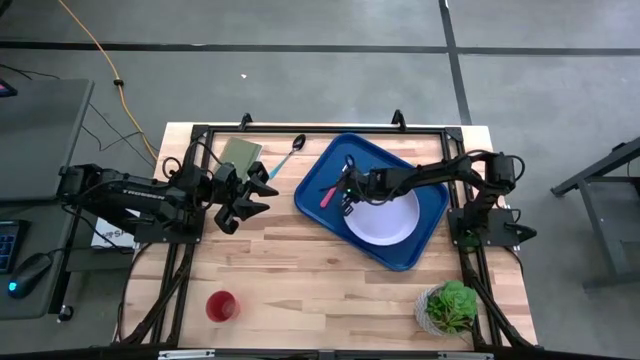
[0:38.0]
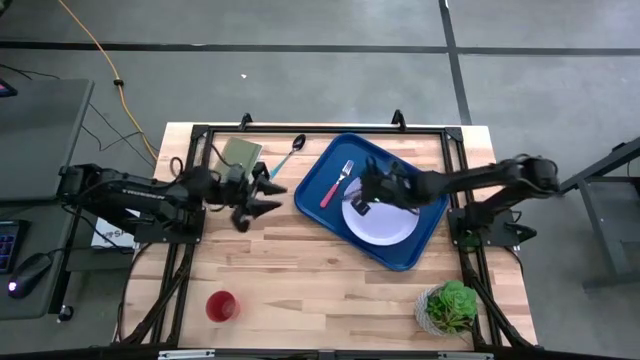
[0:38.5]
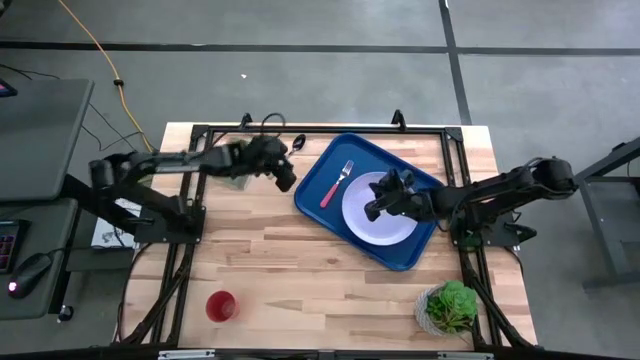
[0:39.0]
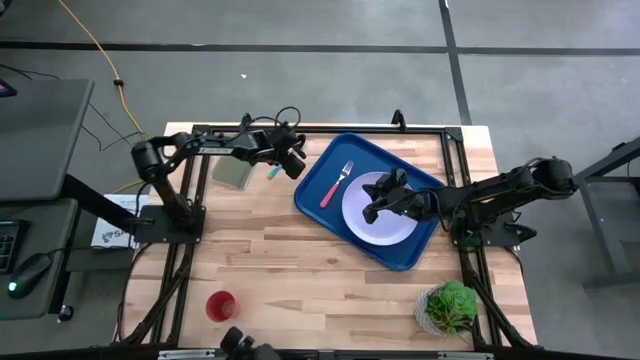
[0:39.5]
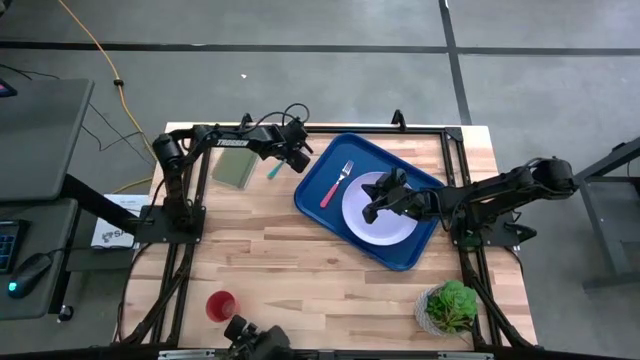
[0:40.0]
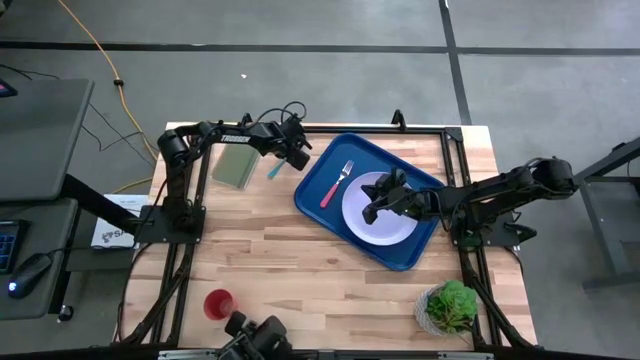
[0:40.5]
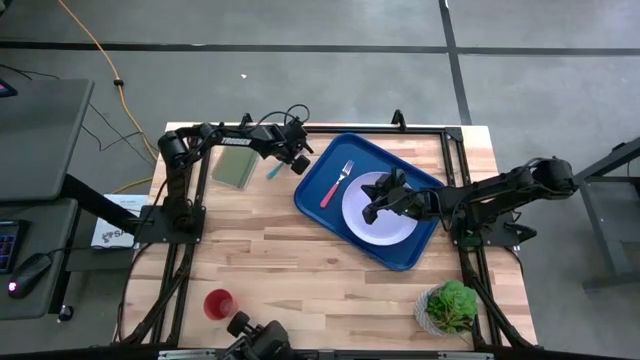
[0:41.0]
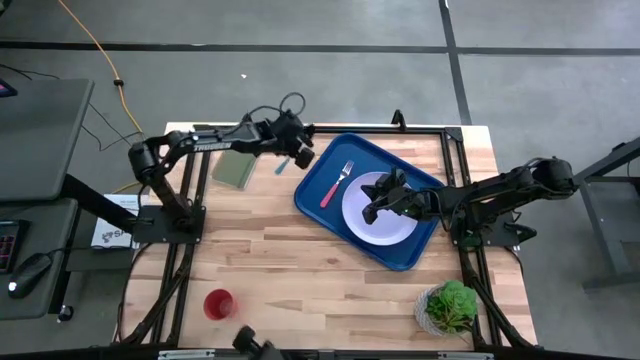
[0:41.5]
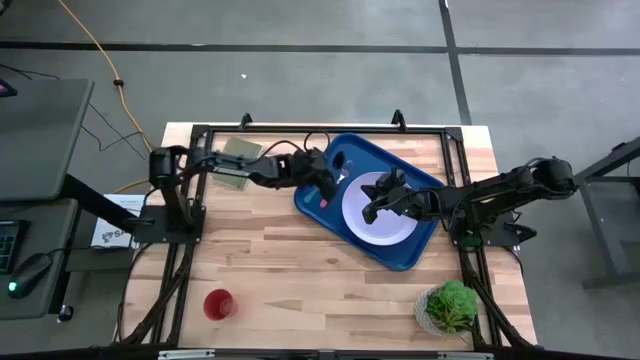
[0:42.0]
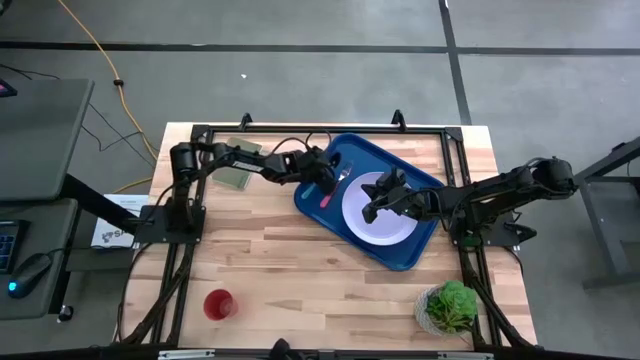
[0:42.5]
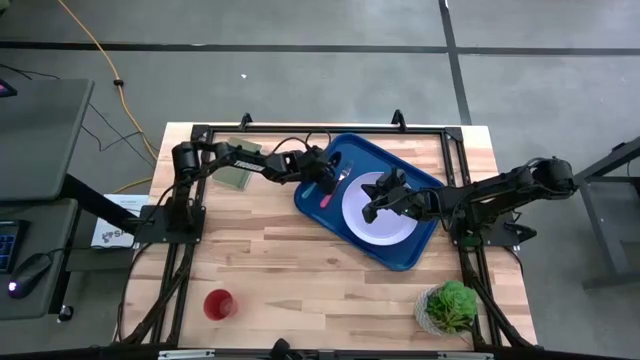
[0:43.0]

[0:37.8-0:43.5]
Task: Pick and place plate/cup/fork/spoon on tray
Put the blue spoon on the blue tray

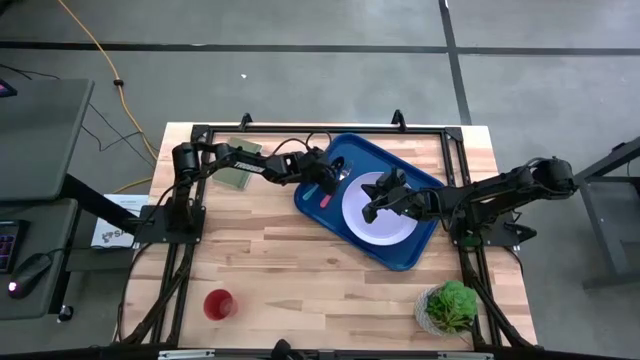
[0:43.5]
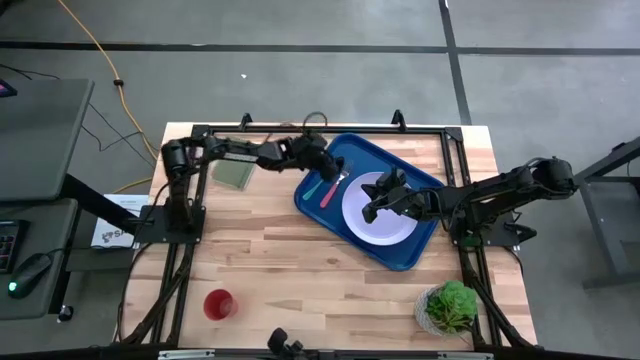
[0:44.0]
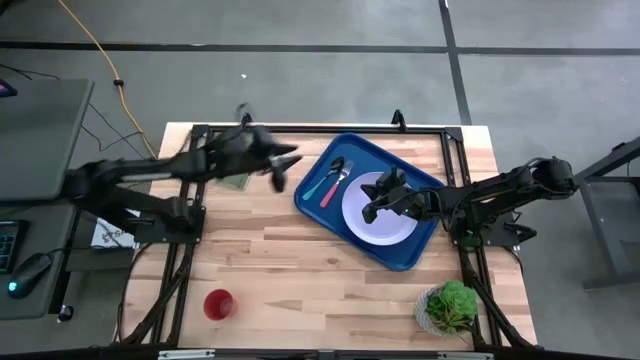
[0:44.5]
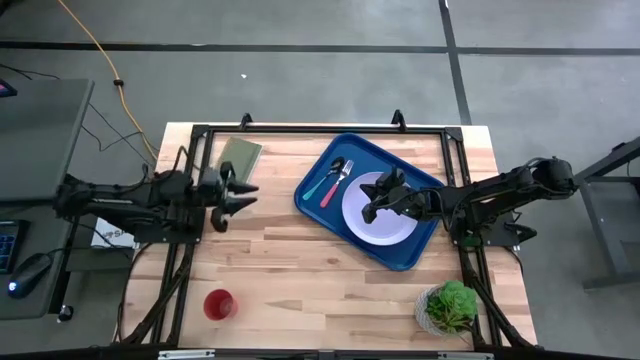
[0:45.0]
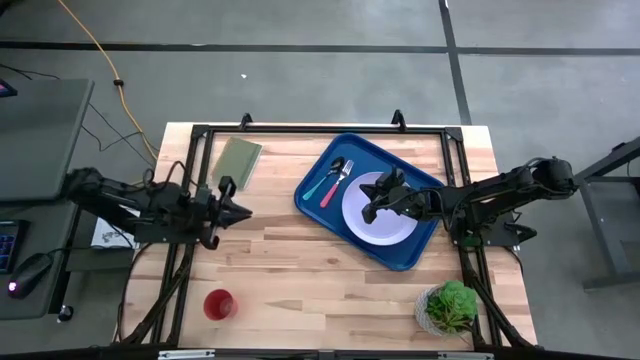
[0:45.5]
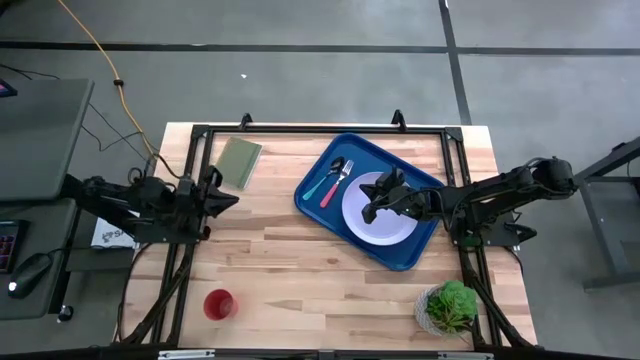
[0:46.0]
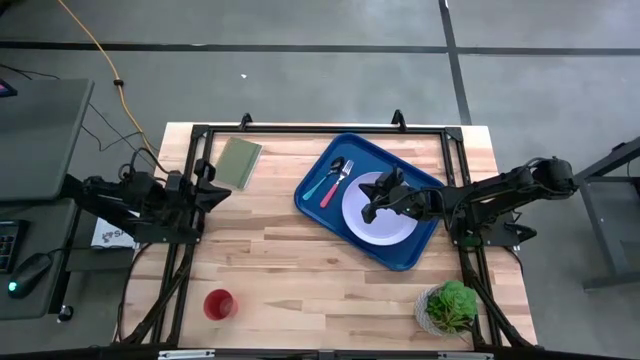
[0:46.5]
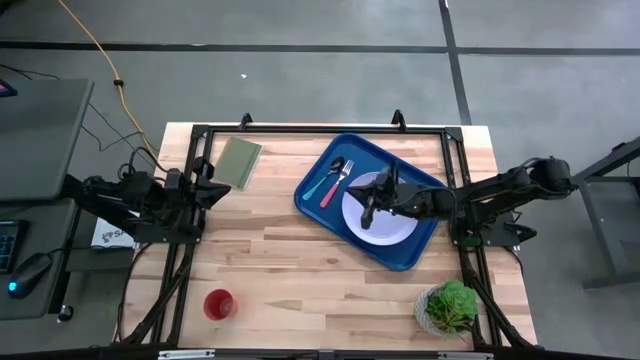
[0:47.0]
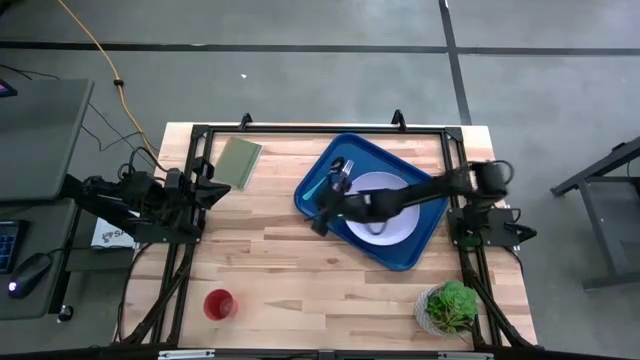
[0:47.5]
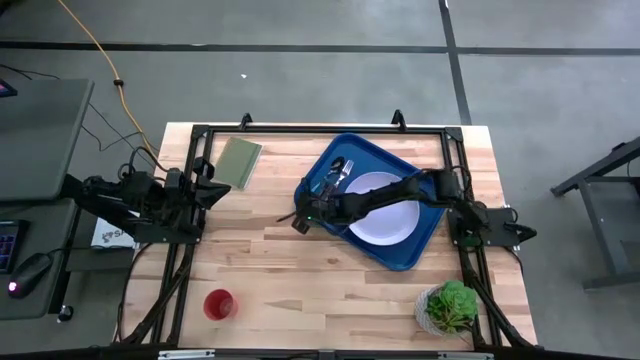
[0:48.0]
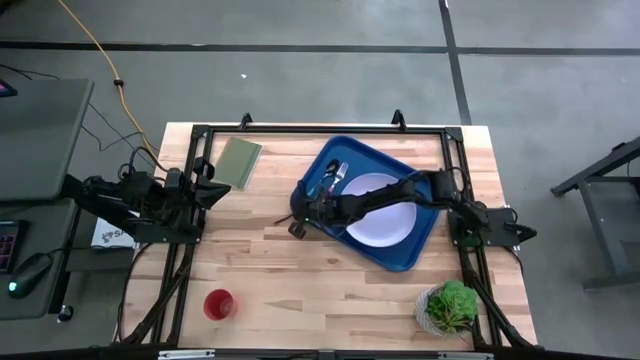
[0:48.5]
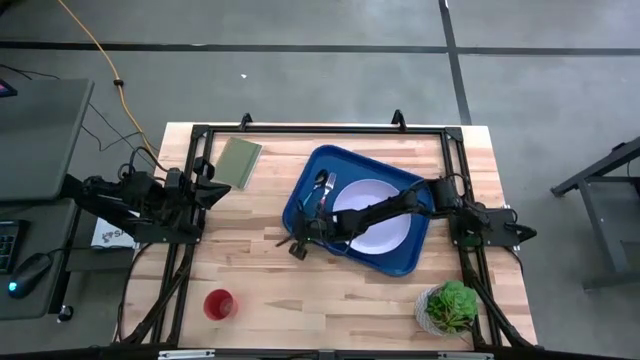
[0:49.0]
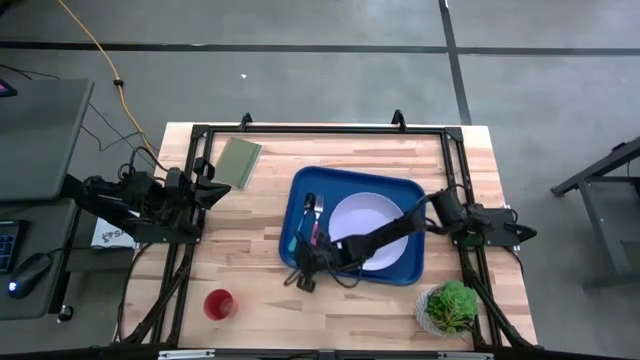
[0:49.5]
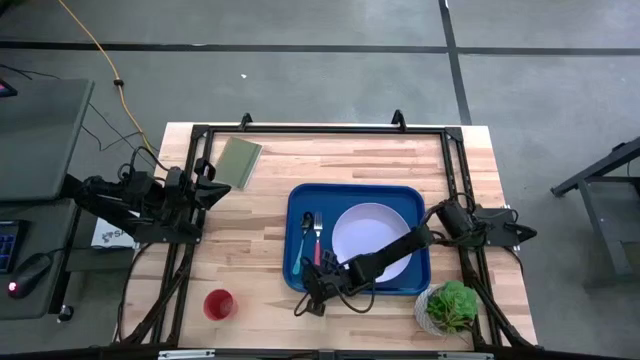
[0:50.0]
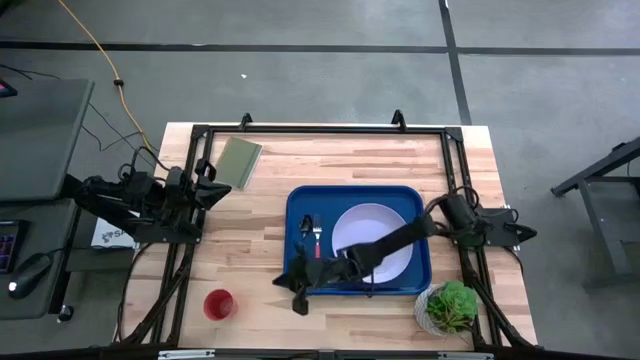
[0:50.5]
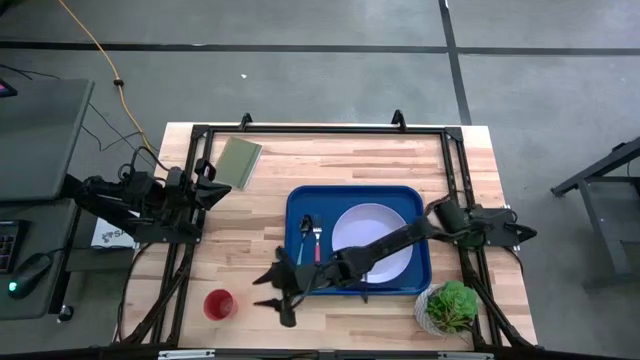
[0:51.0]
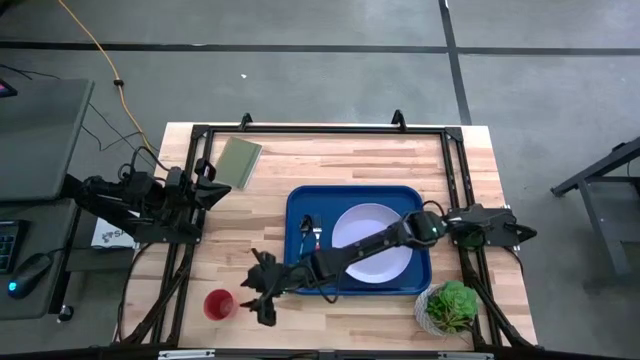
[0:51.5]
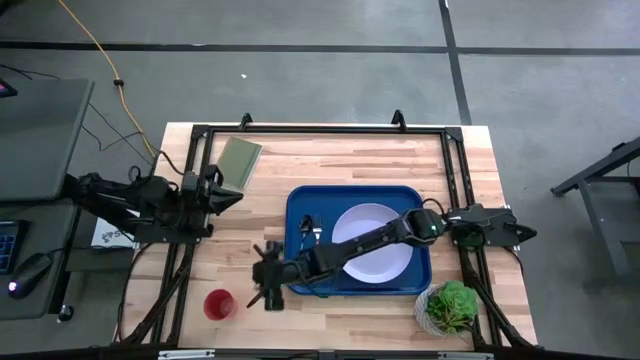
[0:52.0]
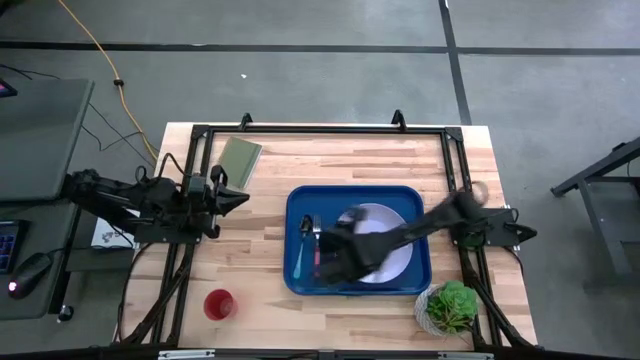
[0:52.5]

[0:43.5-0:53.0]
Move the blue tray from the top right to the center of the table

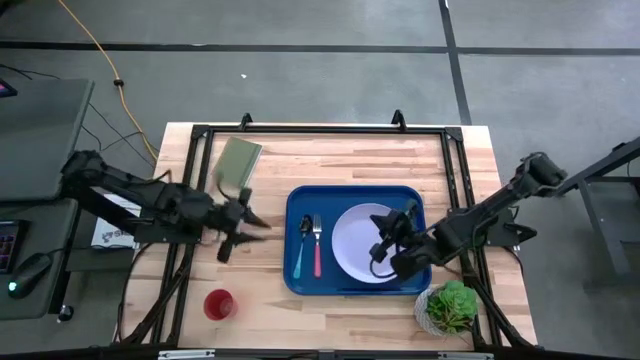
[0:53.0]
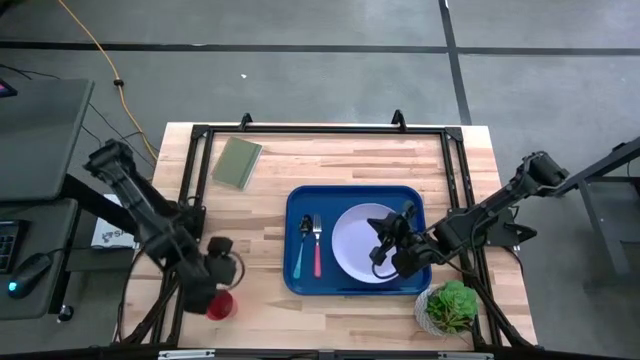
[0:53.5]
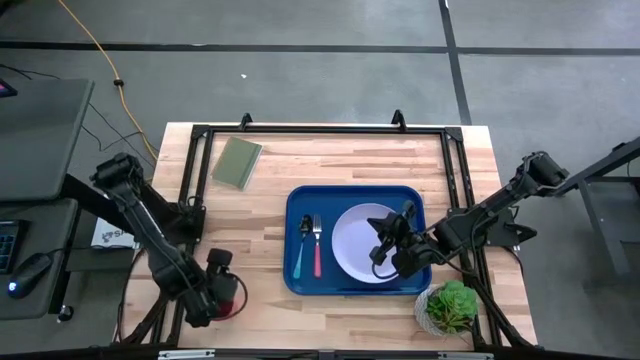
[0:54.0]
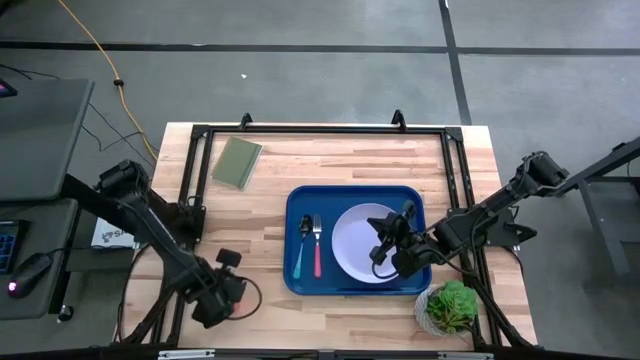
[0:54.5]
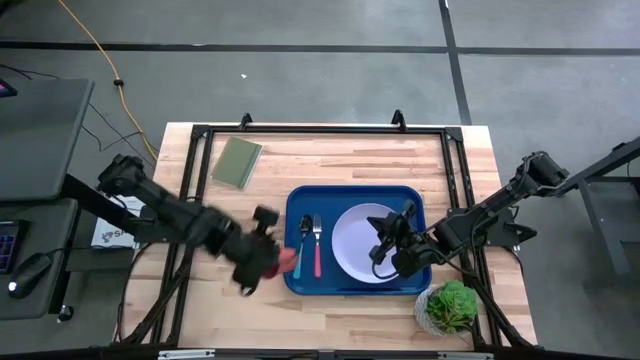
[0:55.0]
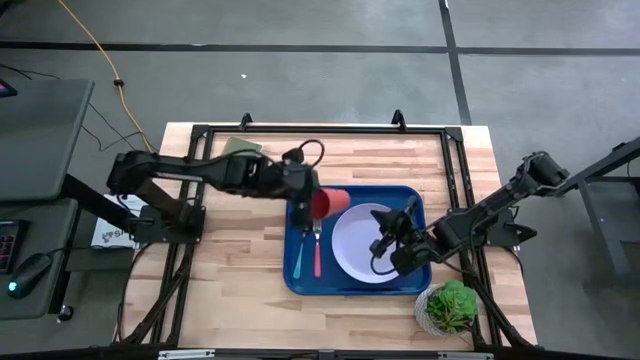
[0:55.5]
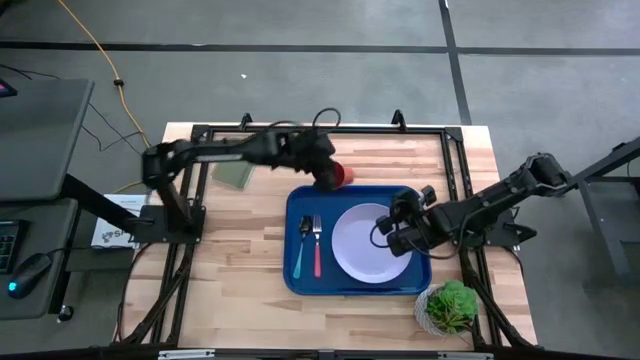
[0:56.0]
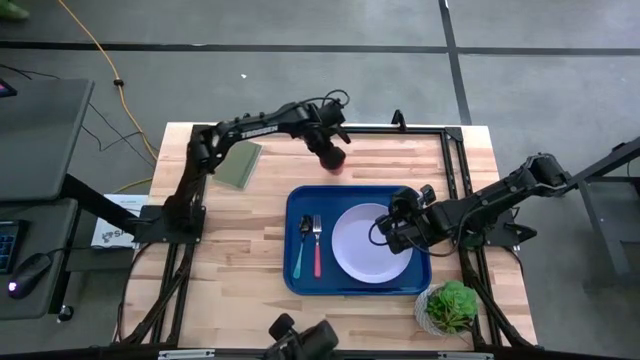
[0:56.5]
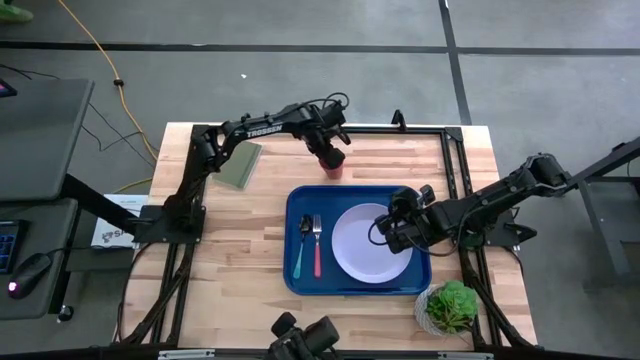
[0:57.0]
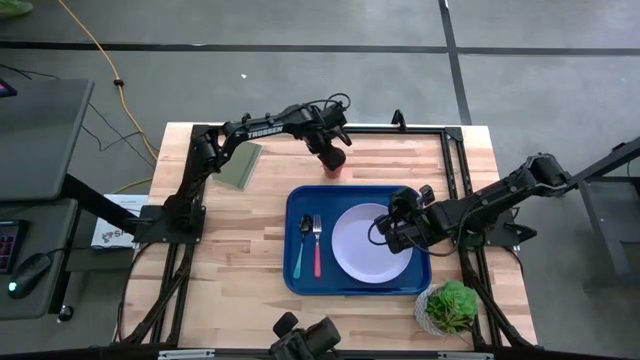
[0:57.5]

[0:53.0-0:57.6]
Move the orange cup from the bottom left to top center of the table

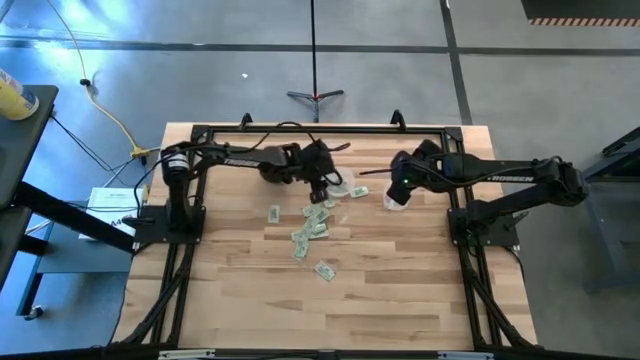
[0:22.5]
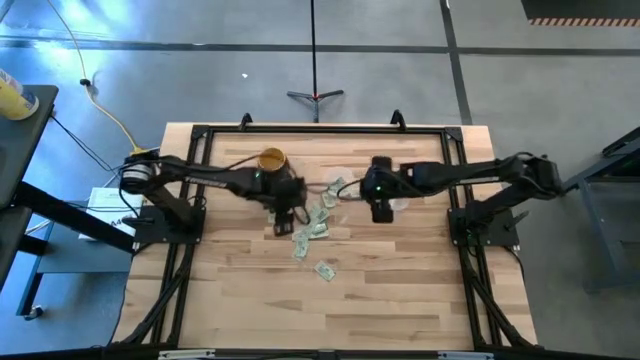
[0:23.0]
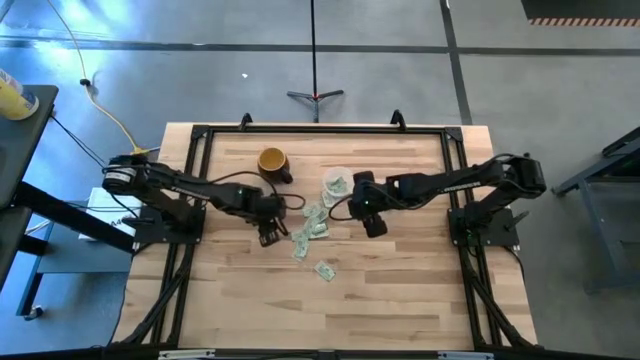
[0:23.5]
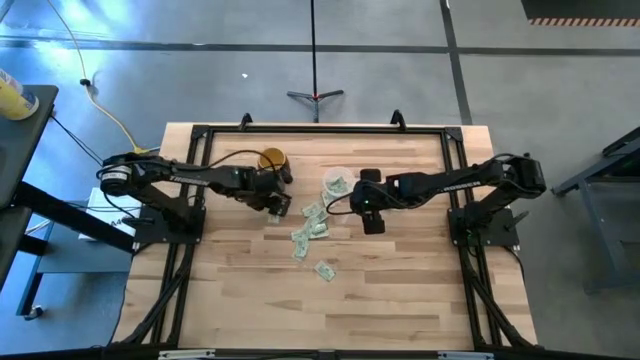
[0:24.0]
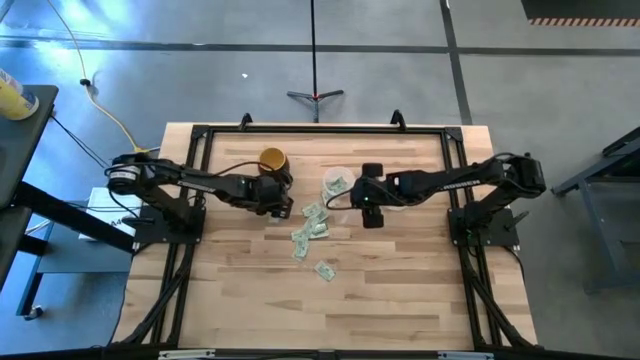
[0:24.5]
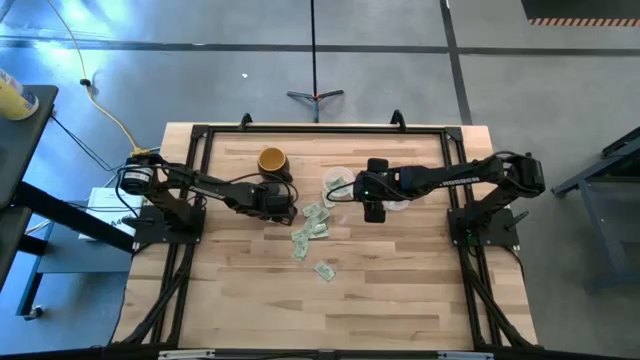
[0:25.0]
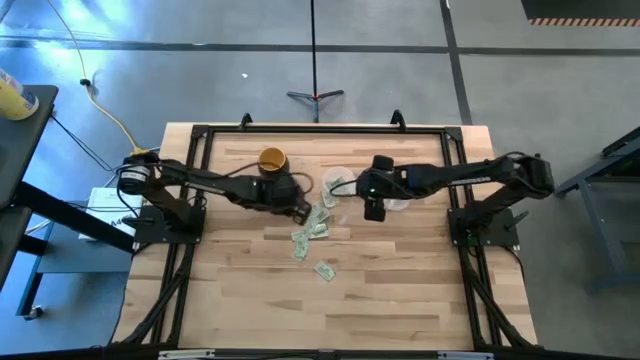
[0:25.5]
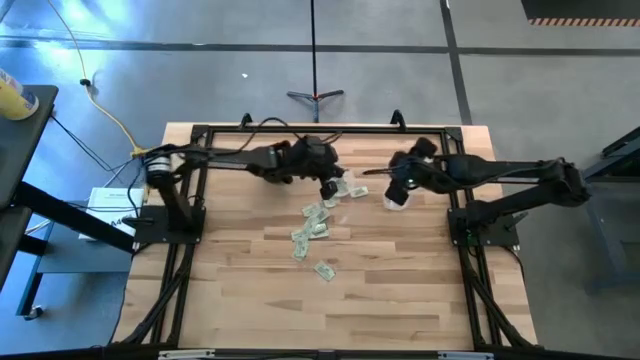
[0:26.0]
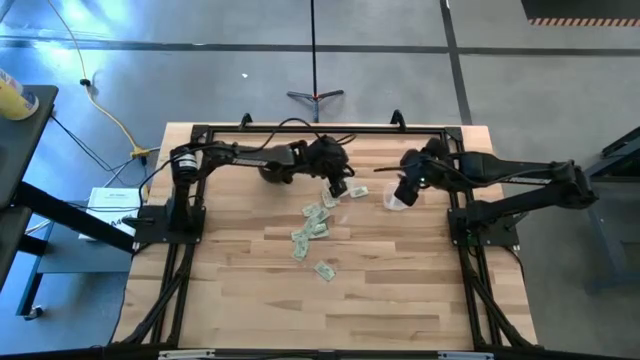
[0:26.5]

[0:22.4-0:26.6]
Task: Pick and place items into bin
Put the light green stevia packet into the left transparent bin
